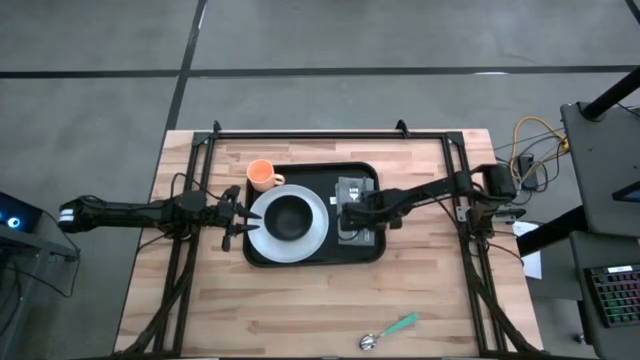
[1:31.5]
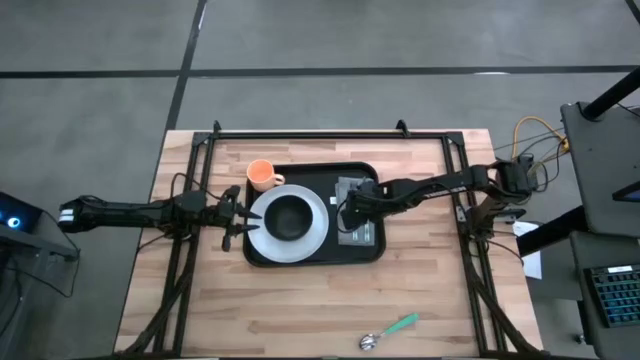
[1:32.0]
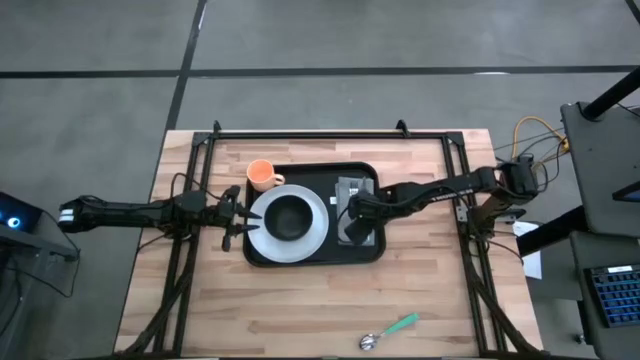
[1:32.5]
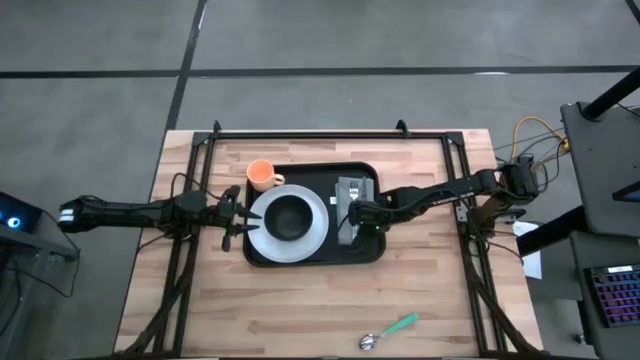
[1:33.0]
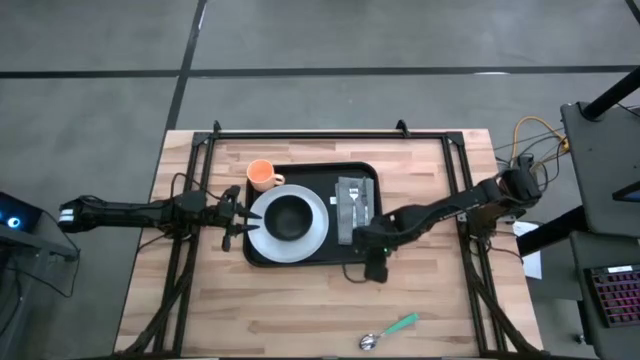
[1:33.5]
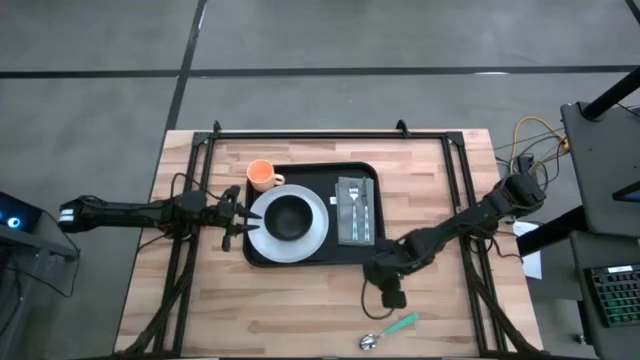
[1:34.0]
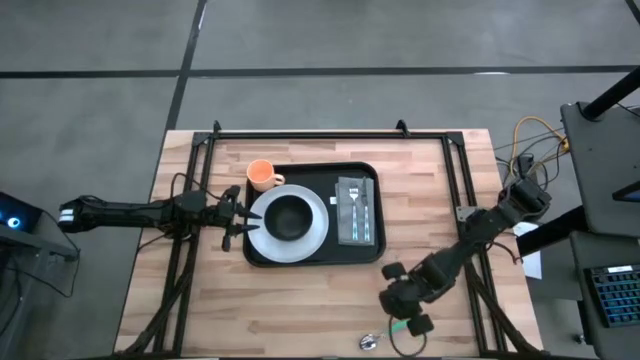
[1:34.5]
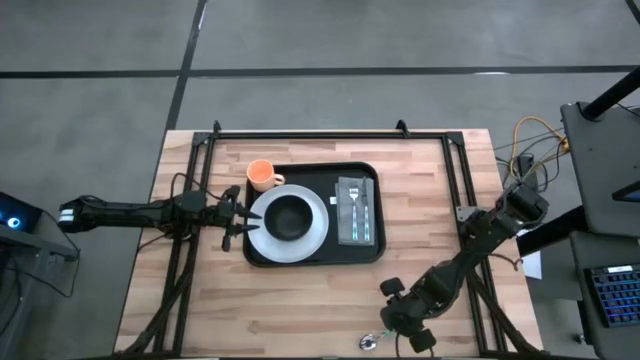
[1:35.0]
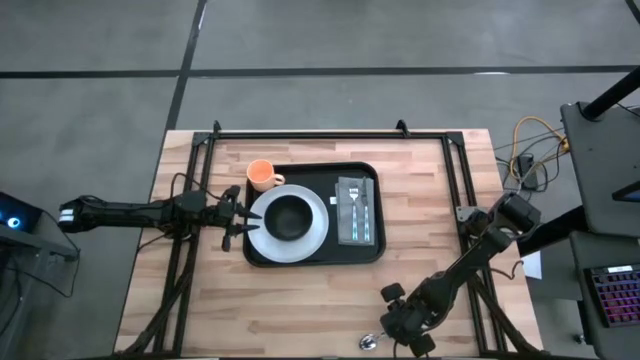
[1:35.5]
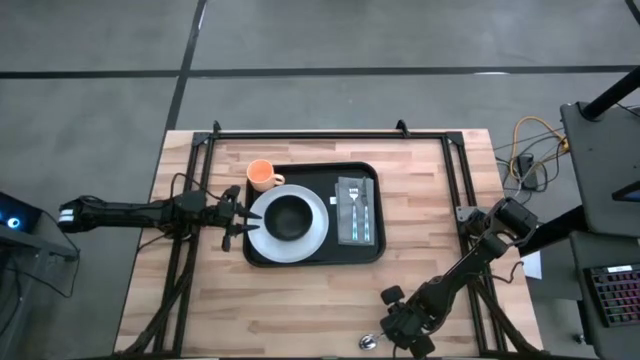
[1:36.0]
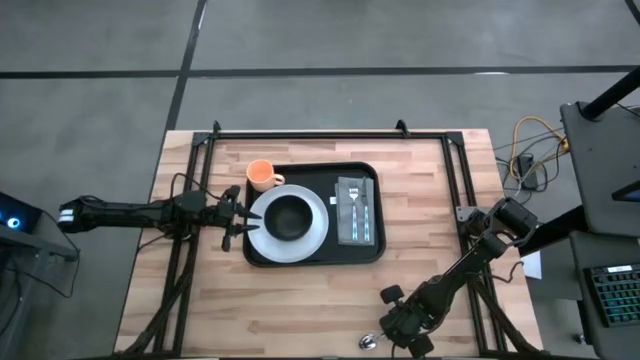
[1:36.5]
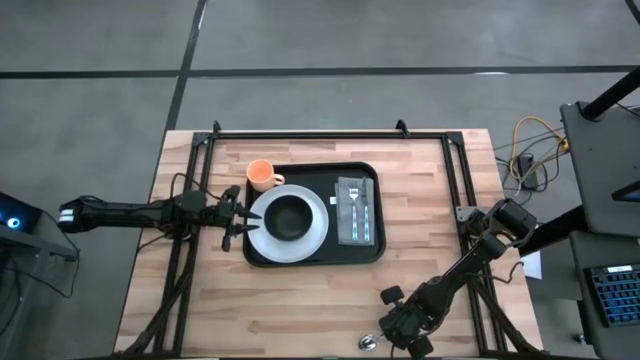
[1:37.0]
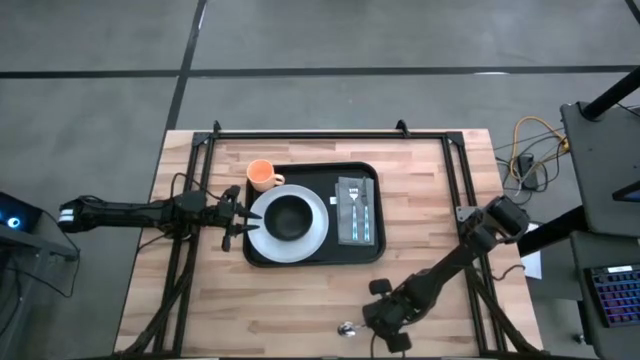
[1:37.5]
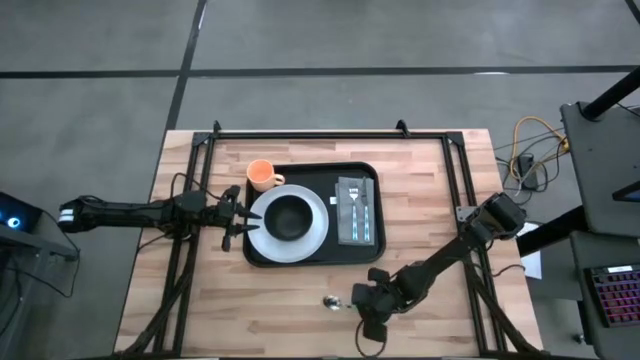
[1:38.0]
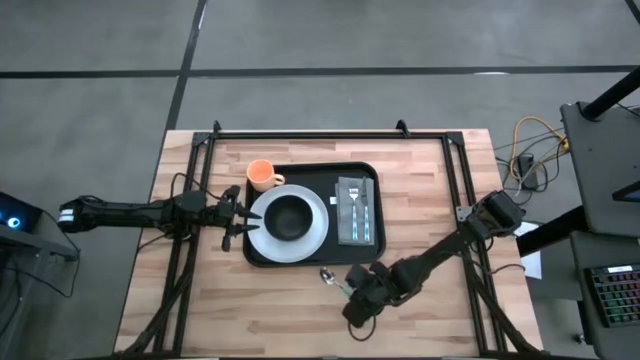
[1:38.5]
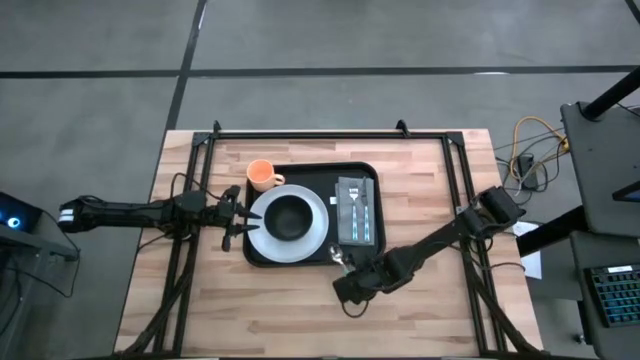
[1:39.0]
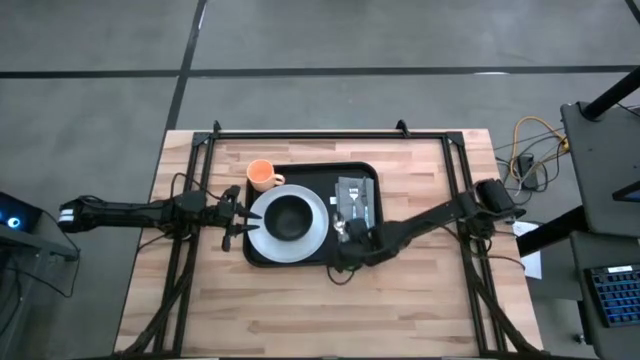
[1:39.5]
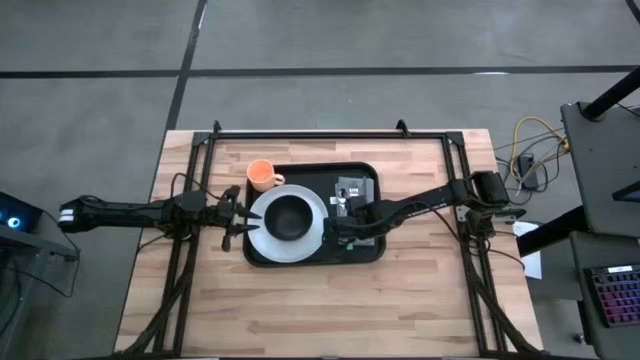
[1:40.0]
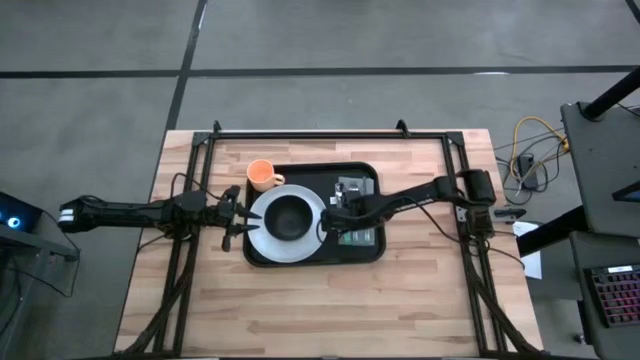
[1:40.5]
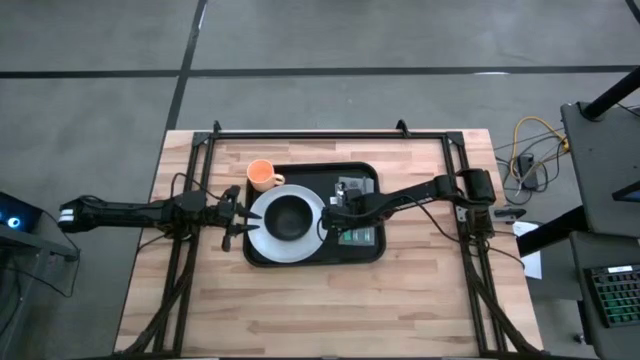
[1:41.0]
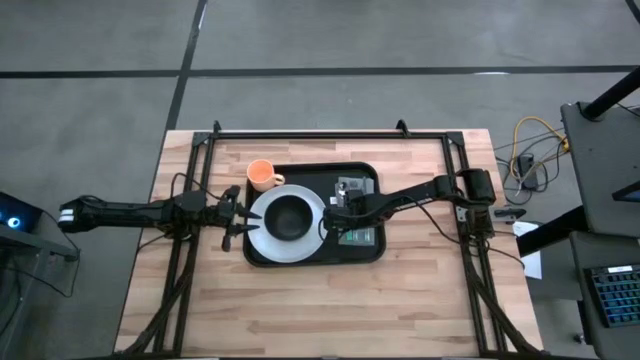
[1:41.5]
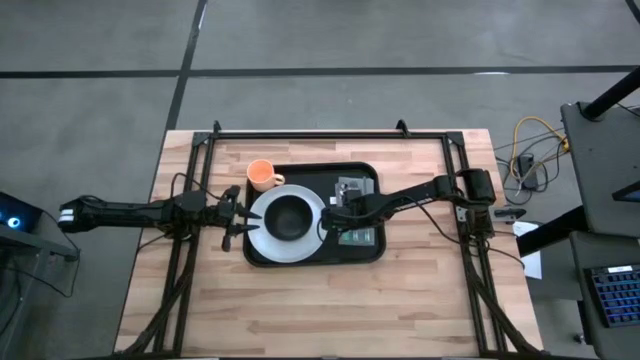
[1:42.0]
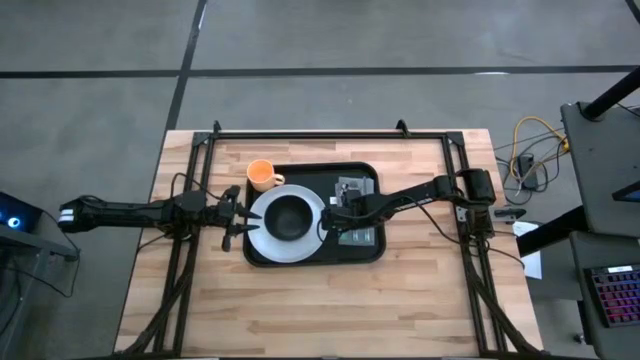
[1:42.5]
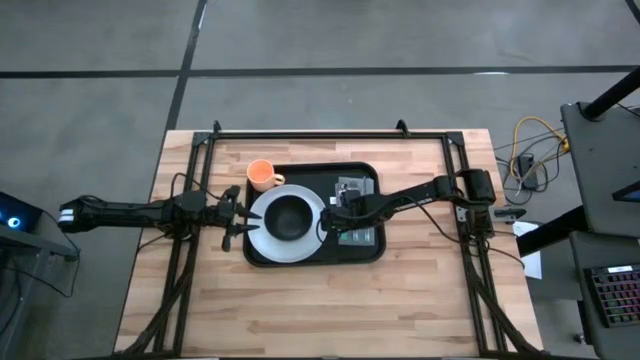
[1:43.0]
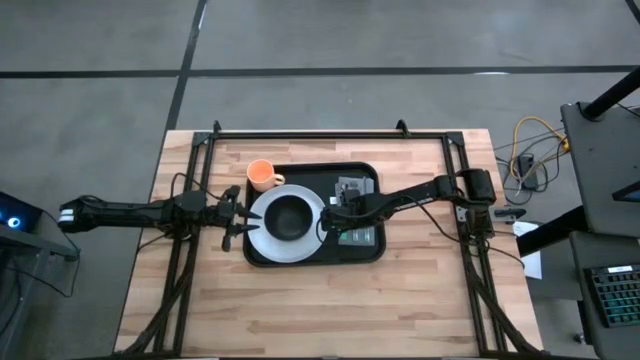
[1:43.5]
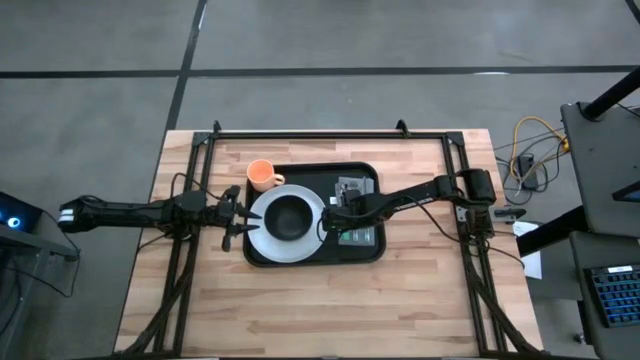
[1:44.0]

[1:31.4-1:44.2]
Task: Set up tray
Put the blue spoon on the gray napkin

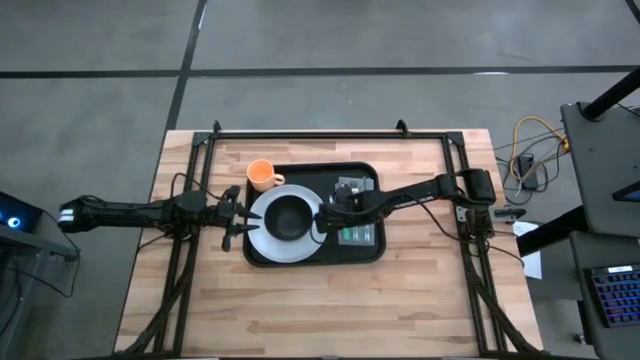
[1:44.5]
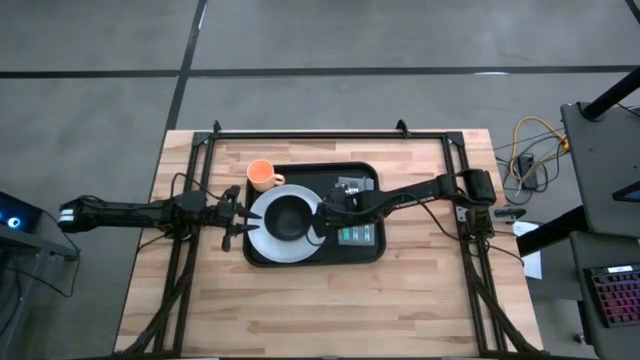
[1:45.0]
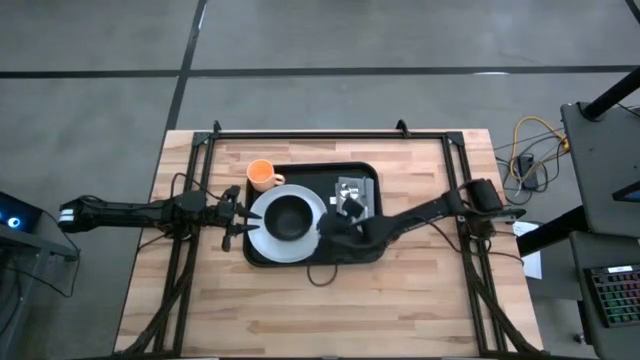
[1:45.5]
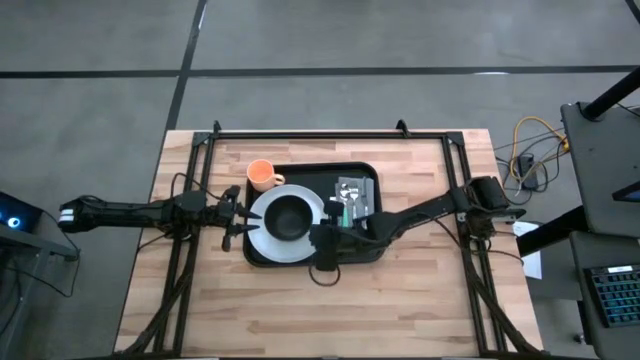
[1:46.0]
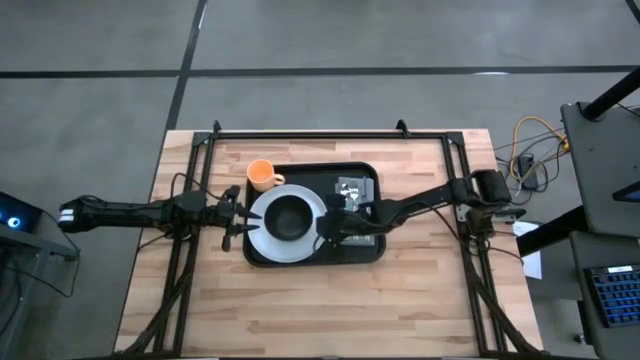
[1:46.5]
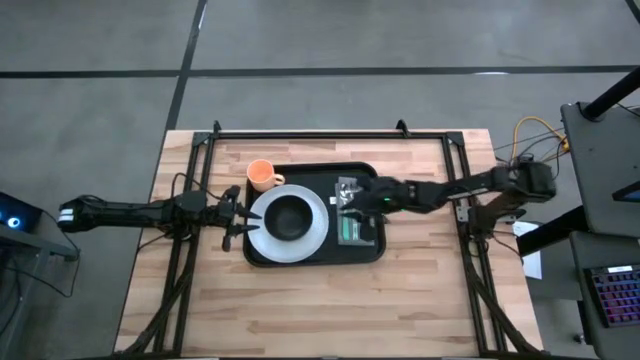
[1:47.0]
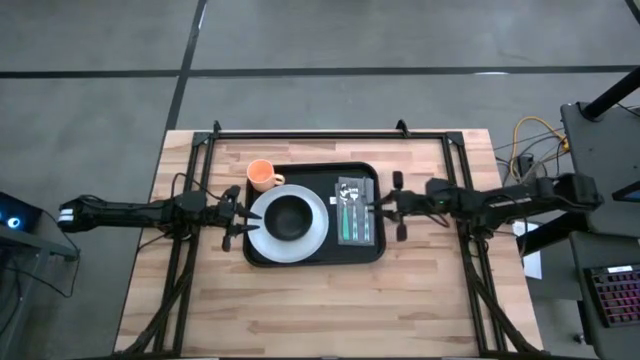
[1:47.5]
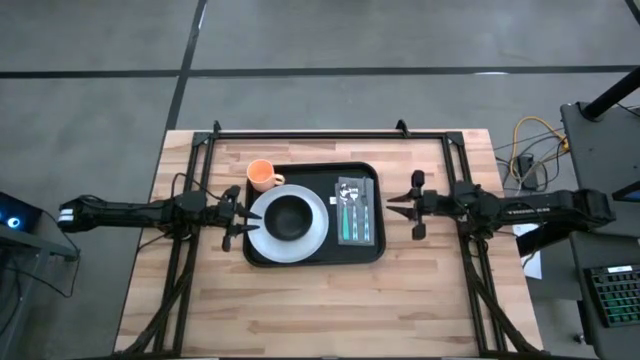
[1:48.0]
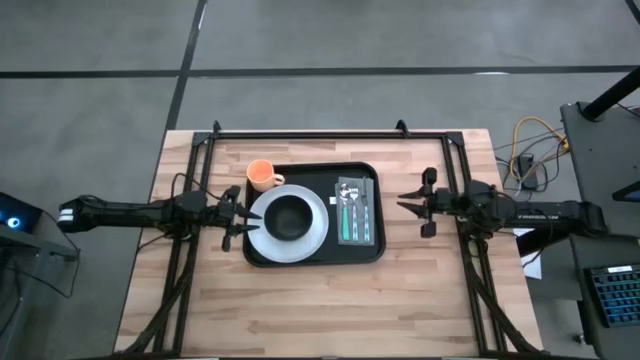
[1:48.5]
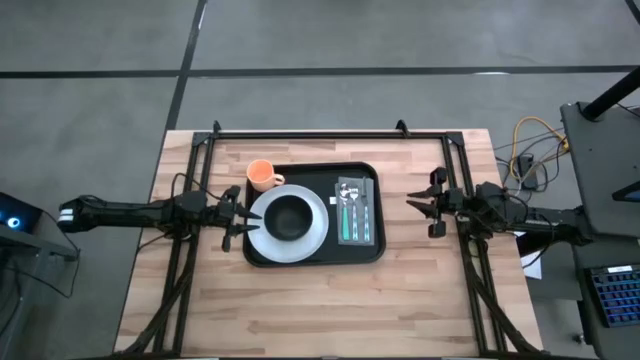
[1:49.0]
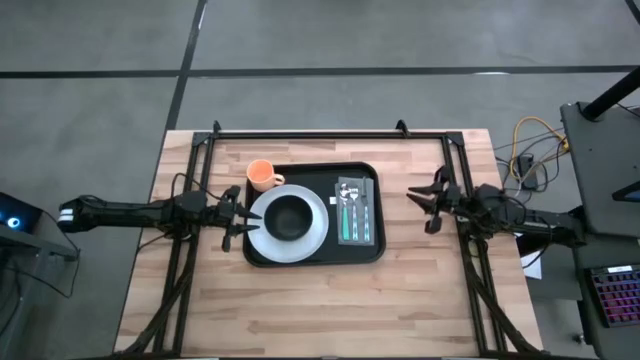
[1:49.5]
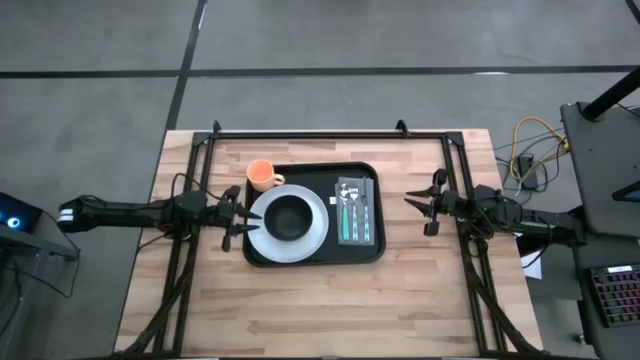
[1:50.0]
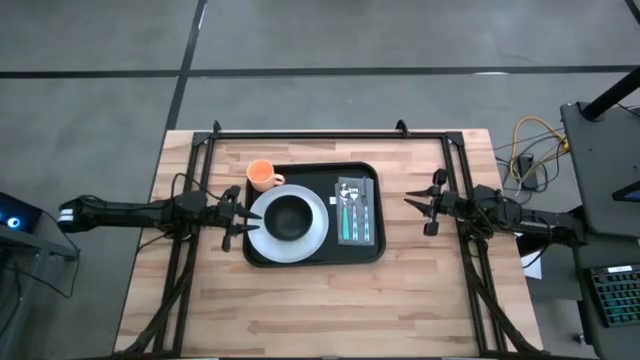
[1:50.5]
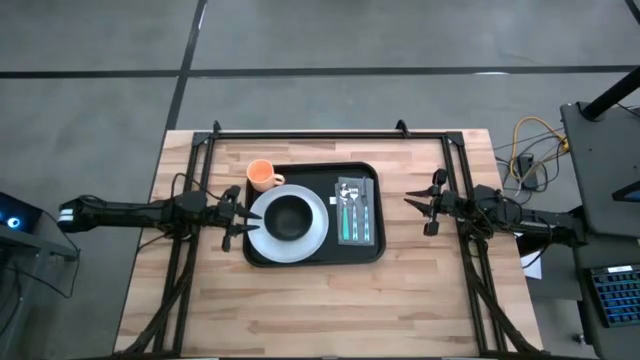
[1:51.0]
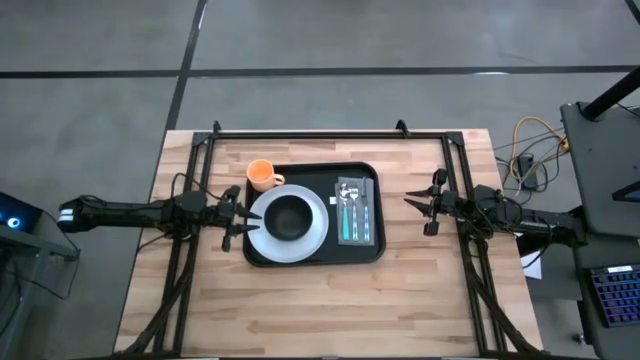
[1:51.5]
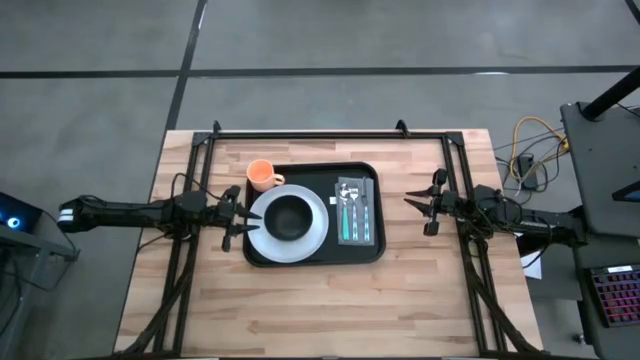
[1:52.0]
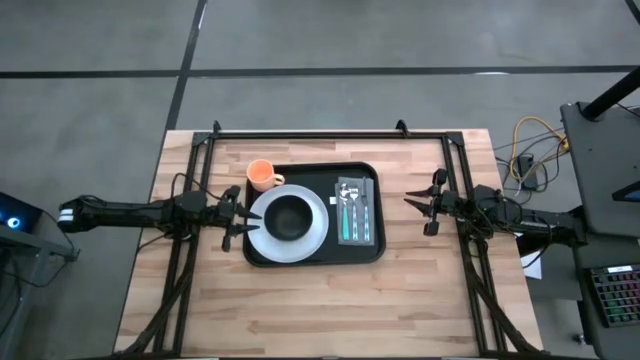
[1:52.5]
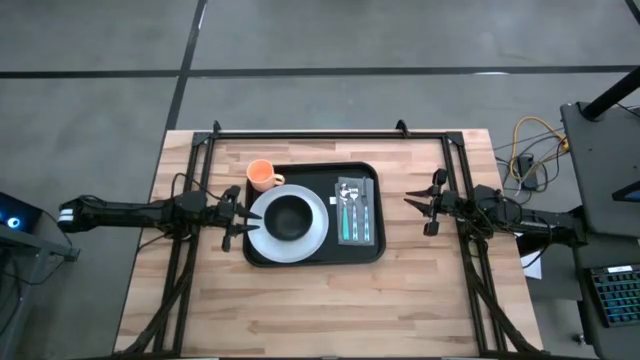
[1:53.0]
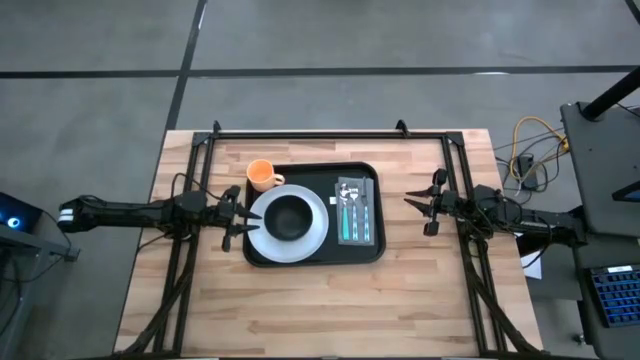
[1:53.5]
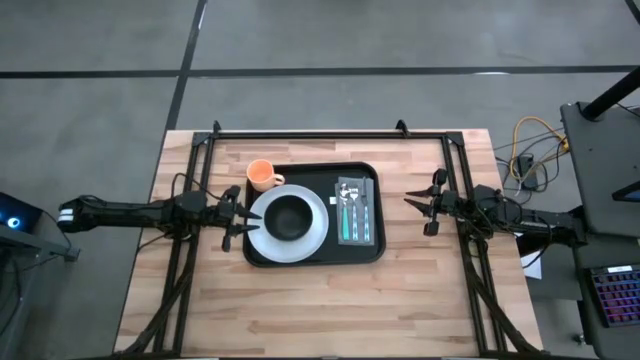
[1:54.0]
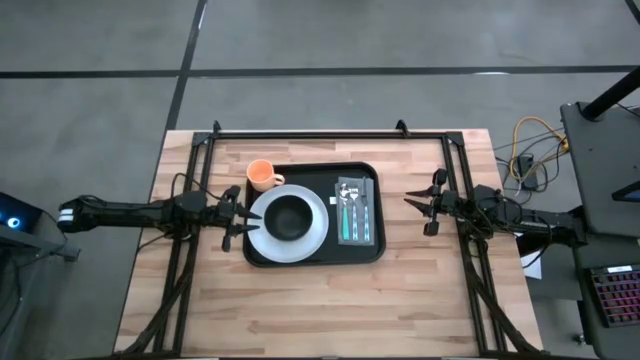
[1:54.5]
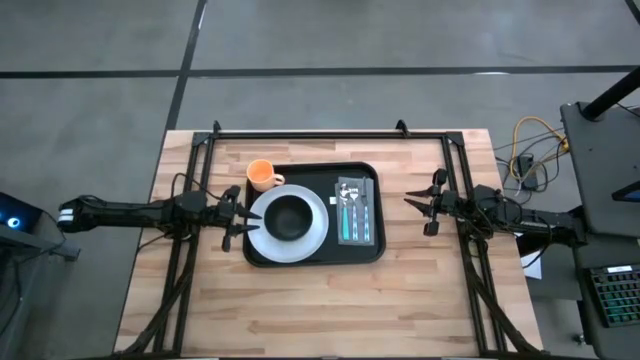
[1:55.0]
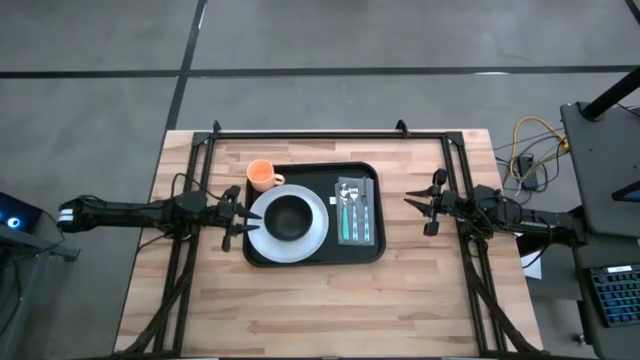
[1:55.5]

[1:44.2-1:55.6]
Return to Home Position
